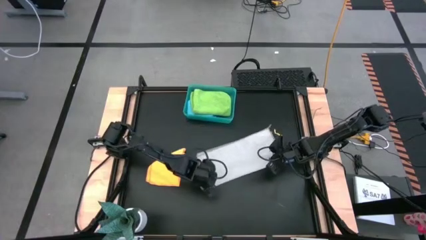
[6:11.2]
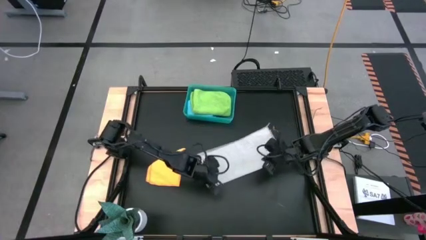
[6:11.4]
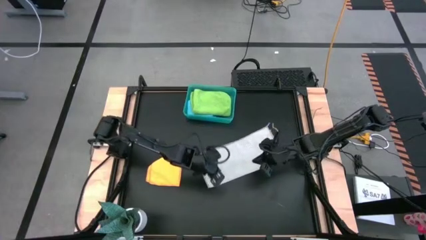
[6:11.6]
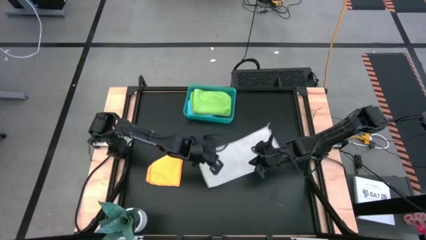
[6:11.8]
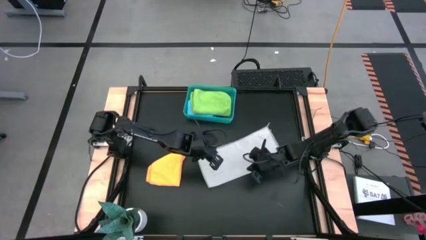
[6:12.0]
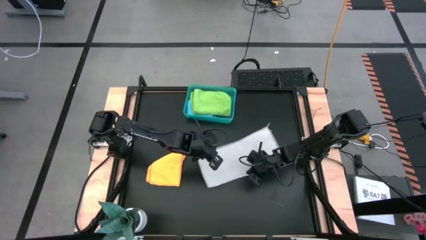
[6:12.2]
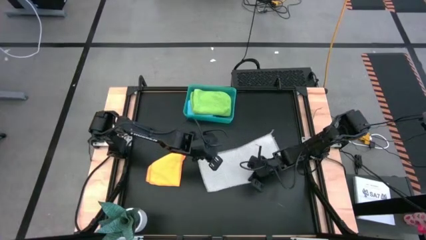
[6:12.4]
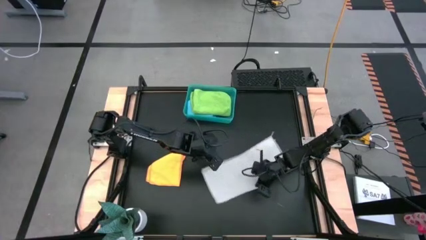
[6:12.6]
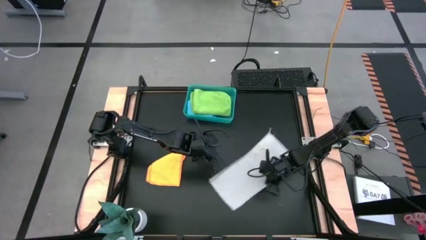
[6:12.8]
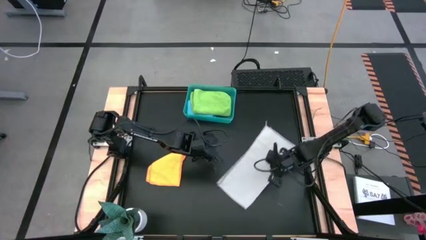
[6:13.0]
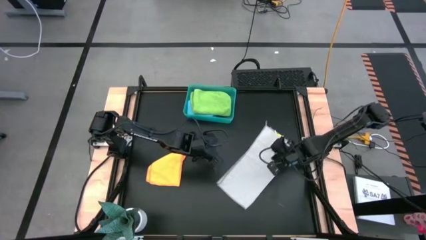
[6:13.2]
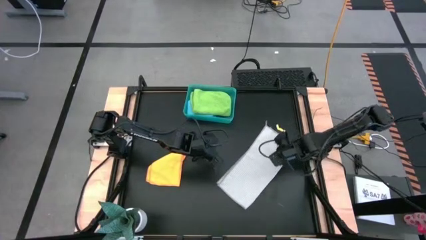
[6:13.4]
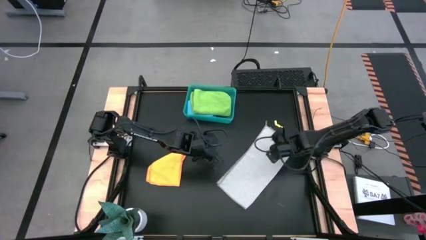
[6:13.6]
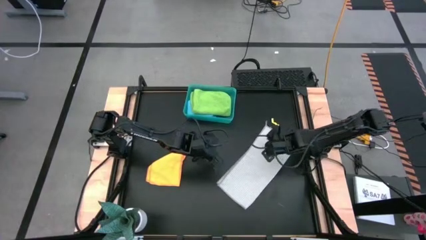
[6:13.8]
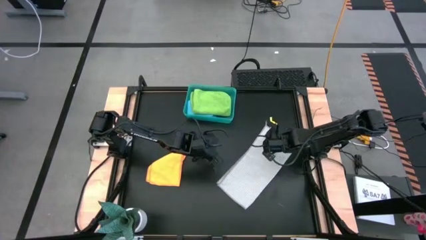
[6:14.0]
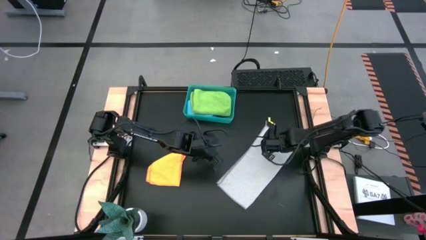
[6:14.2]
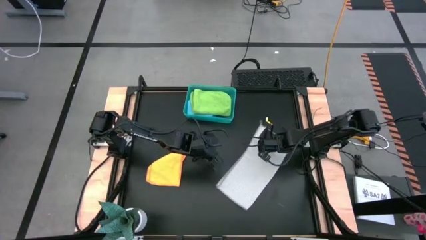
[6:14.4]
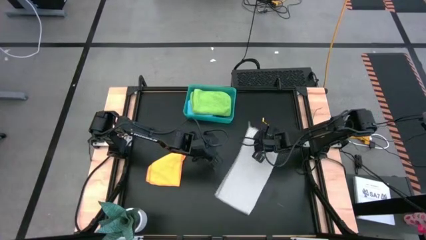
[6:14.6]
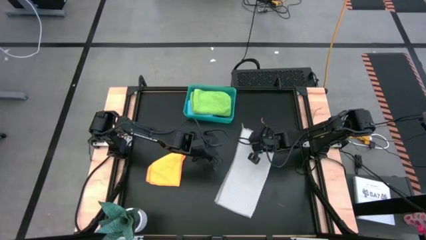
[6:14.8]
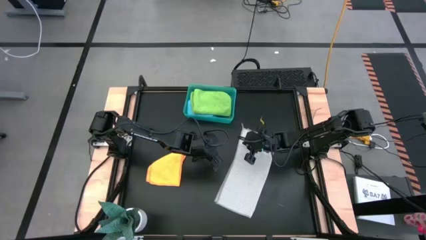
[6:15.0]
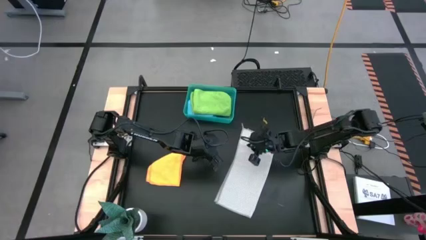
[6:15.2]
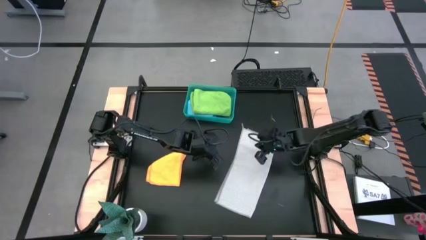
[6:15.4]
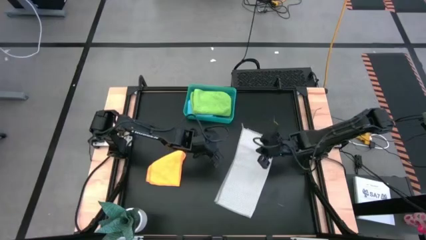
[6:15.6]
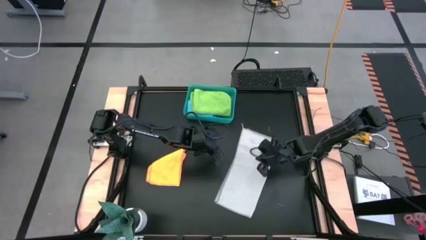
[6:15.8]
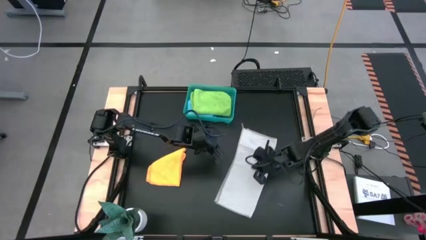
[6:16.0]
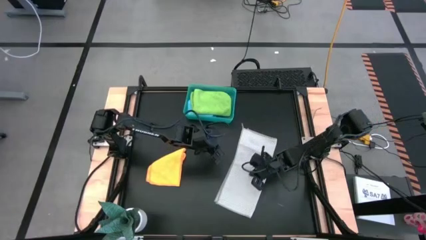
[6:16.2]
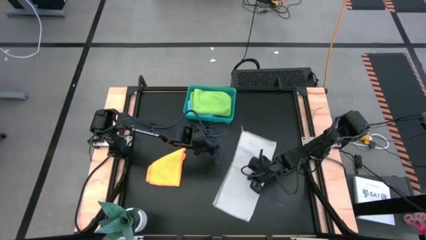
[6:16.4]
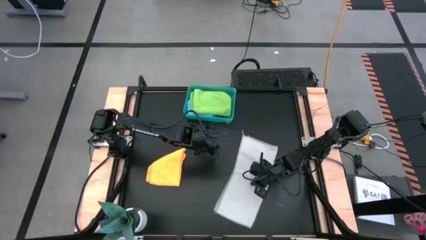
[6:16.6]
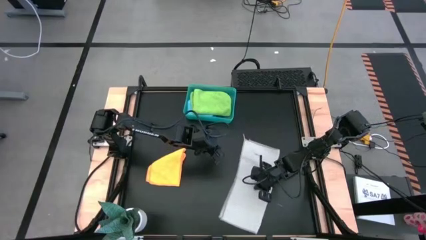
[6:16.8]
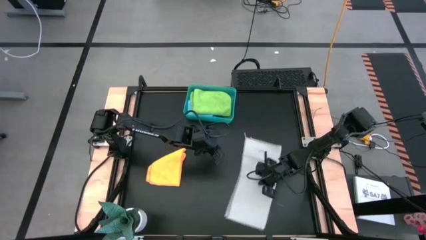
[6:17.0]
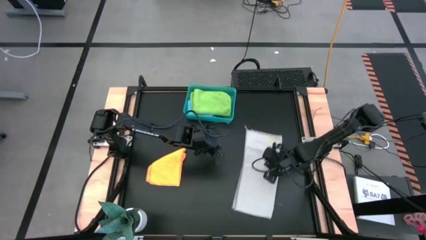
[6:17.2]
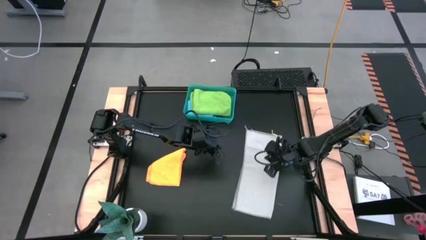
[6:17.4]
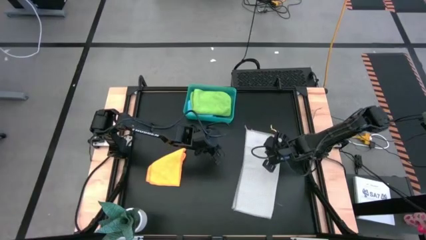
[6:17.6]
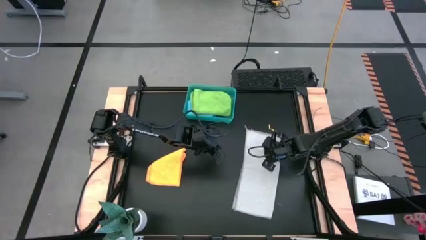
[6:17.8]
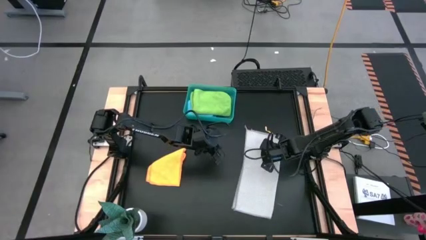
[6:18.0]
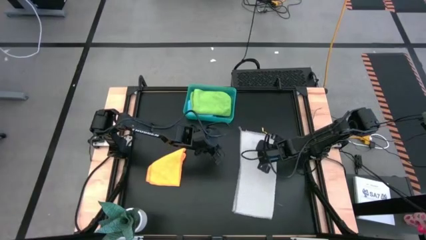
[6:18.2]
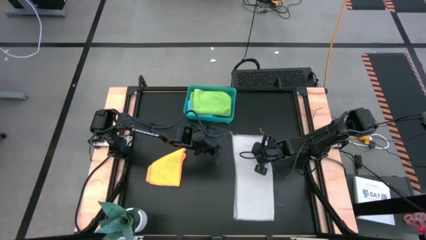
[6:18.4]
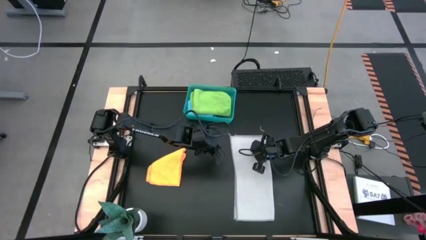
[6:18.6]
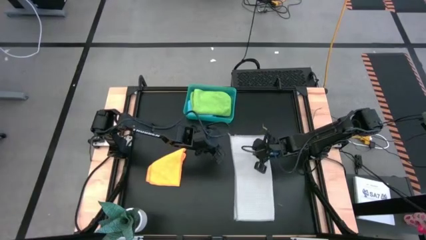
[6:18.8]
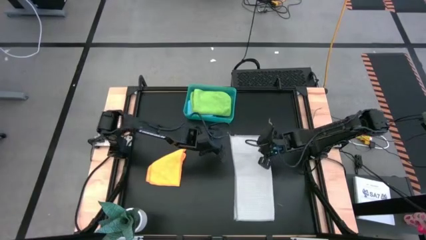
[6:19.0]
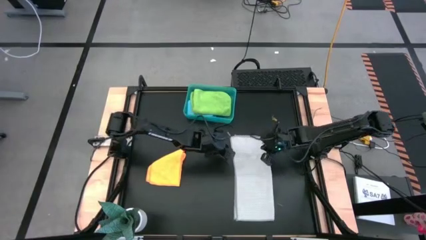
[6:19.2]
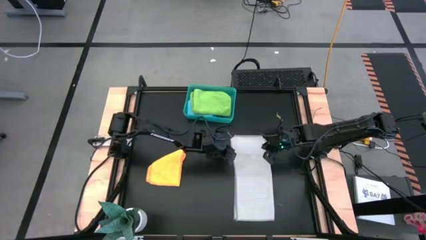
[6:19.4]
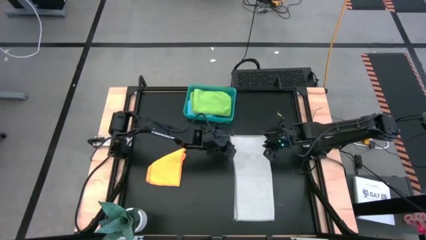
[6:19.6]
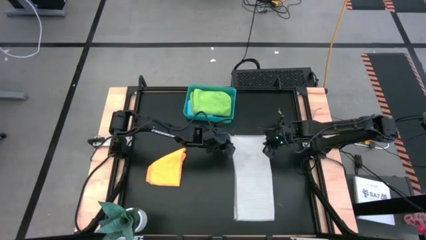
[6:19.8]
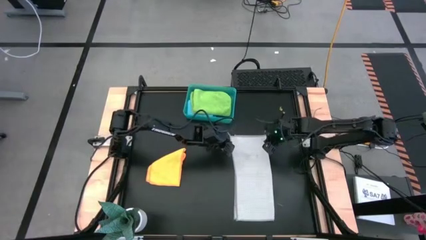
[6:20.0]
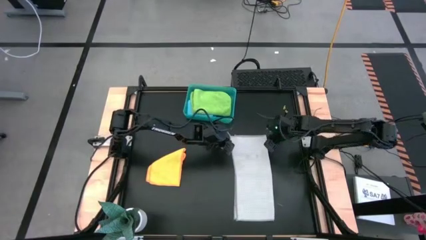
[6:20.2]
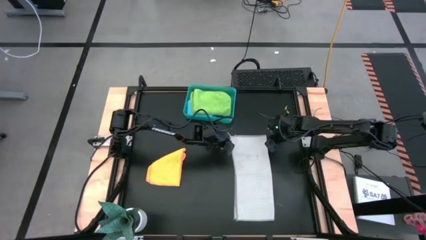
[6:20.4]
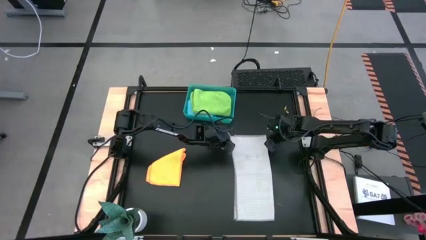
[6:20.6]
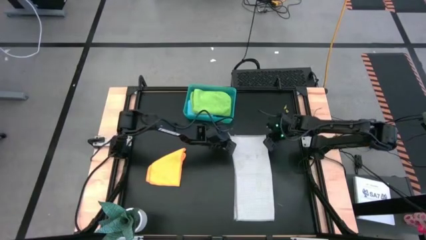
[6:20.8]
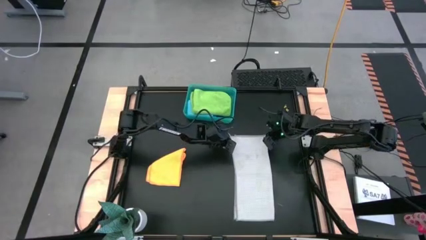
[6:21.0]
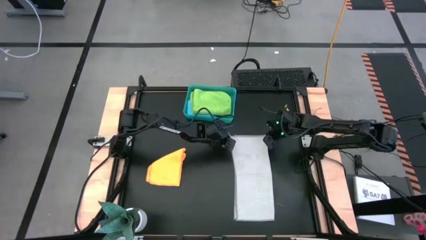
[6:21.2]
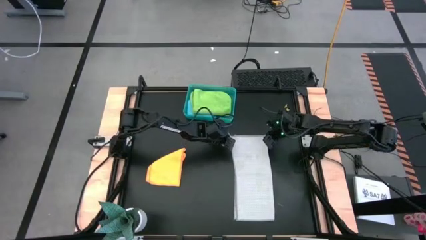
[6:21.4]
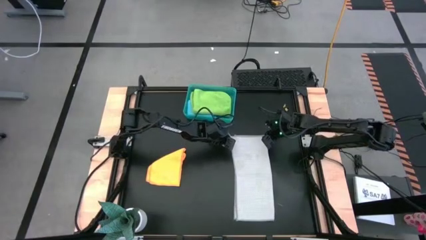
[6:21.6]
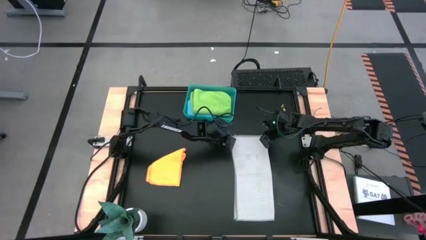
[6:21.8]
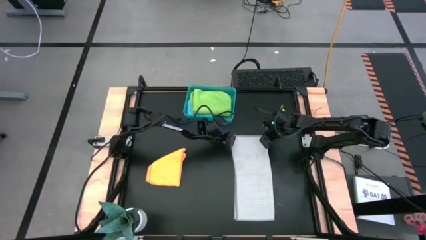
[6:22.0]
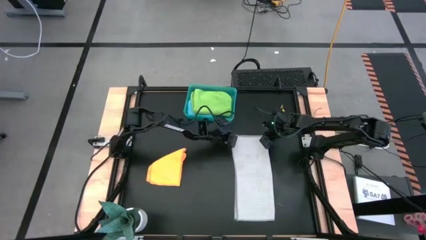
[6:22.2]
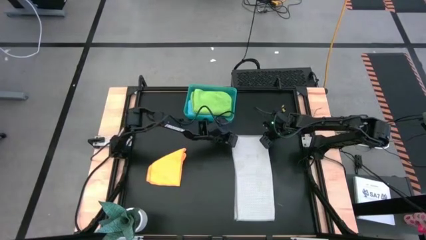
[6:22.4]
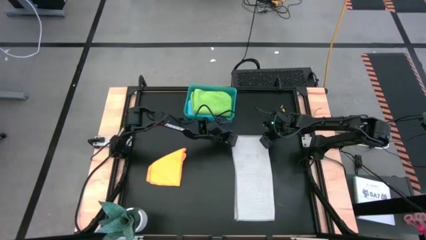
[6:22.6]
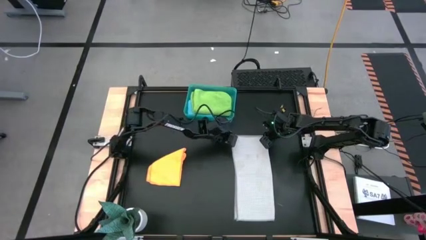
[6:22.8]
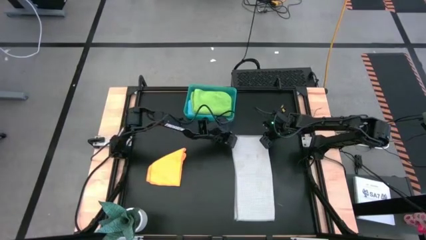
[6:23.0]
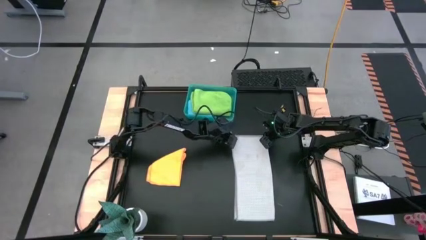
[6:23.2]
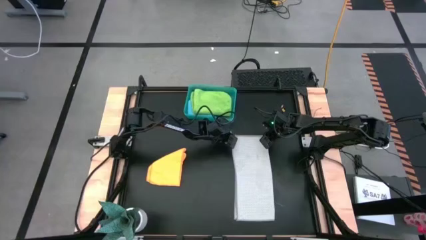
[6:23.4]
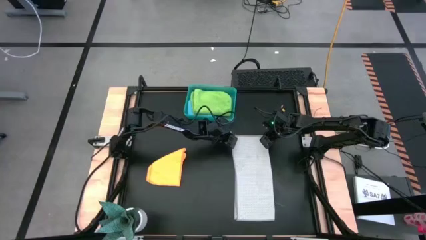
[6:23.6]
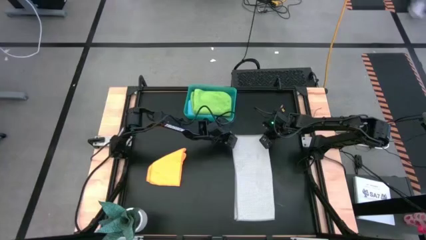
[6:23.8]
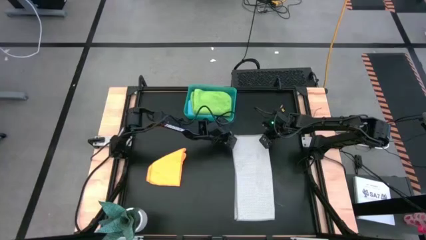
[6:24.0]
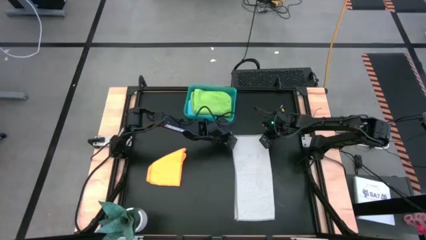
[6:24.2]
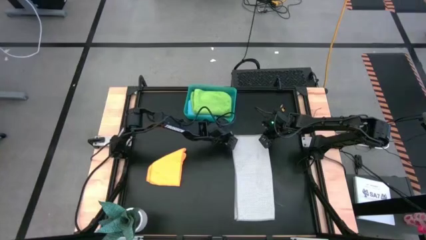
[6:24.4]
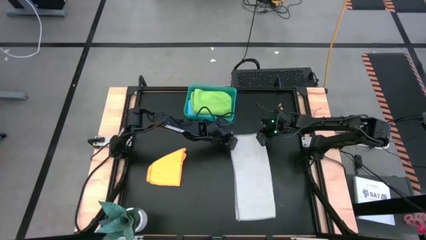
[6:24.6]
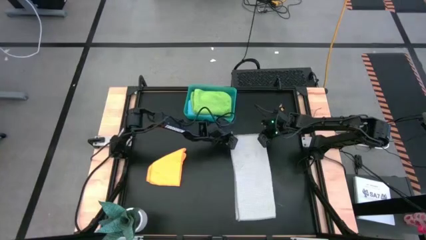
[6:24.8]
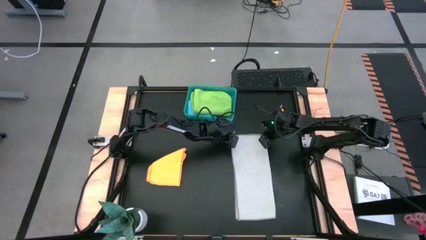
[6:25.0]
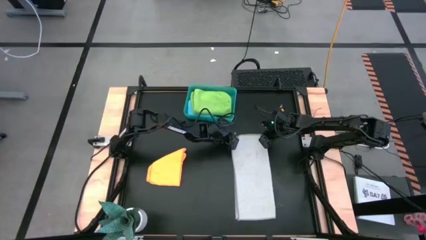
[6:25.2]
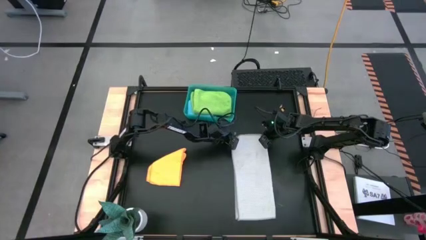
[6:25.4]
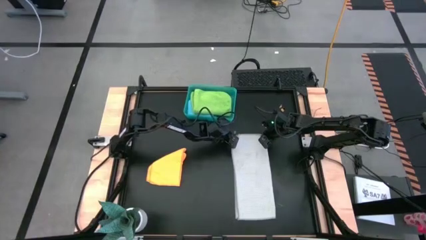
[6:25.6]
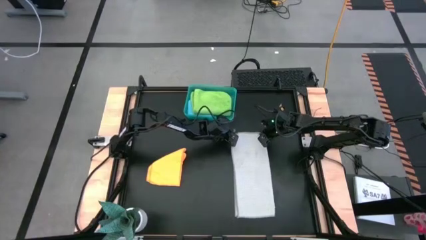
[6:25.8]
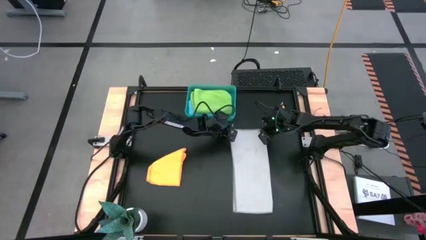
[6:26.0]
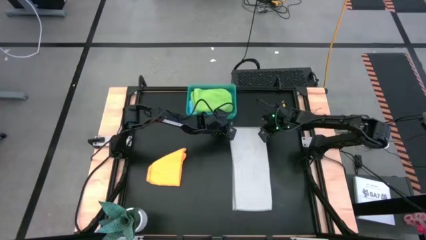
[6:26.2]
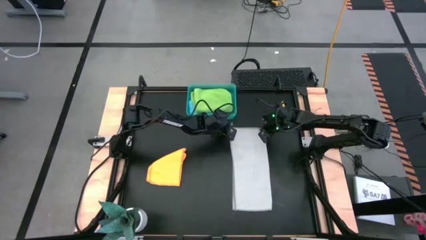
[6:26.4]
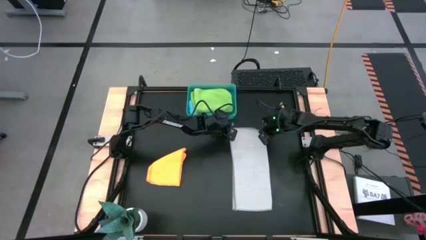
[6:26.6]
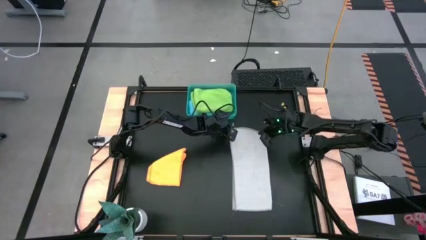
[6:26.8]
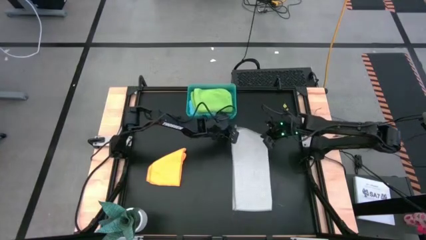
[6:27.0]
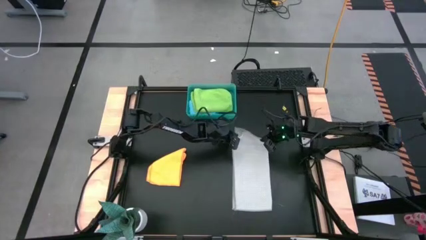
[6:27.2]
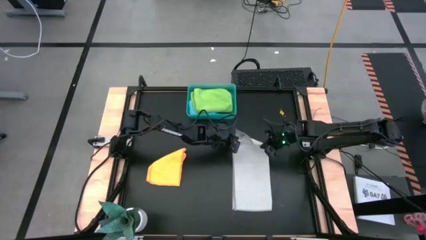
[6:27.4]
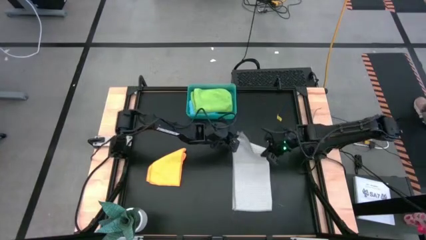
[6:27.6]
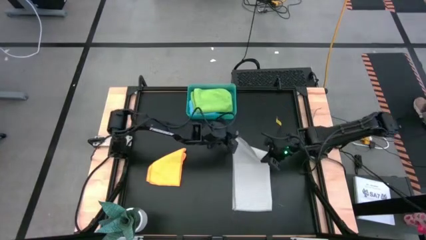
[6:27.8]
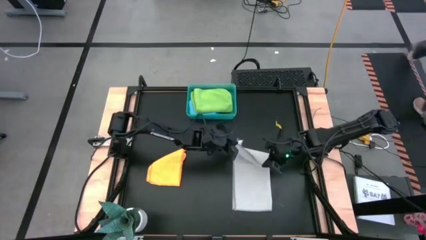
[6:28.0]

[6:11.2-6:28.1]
Task: Fold microfiber towels
Fold the gray towel
